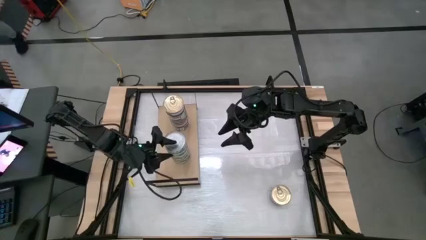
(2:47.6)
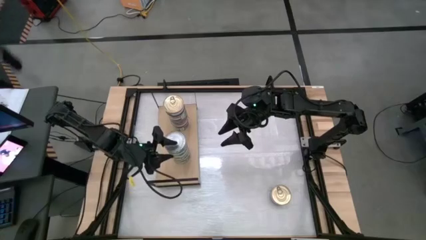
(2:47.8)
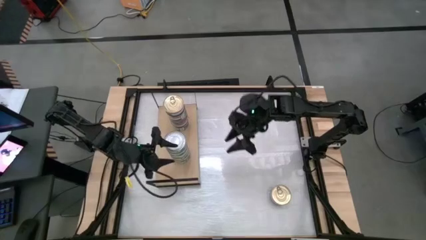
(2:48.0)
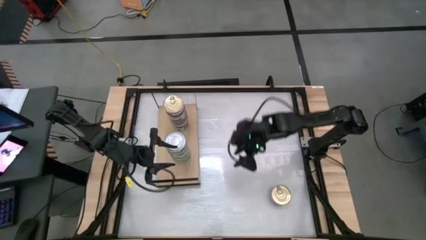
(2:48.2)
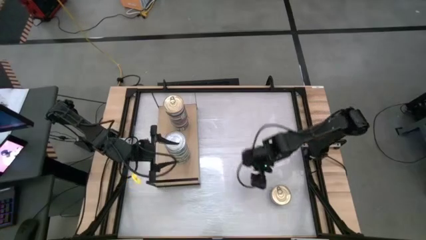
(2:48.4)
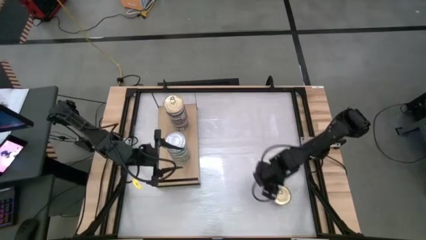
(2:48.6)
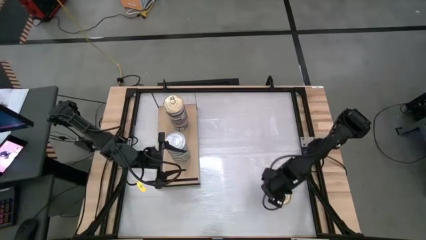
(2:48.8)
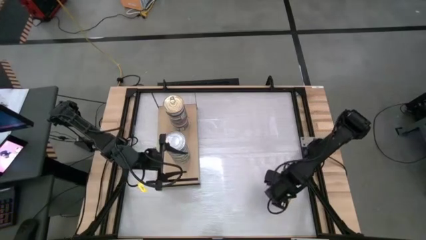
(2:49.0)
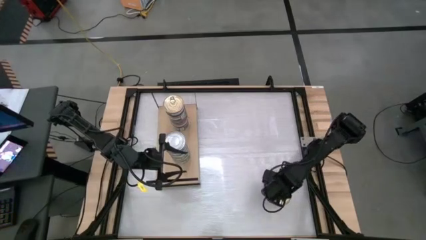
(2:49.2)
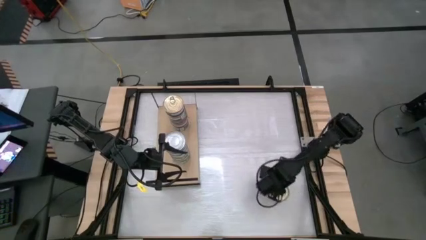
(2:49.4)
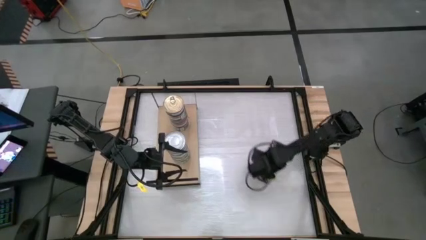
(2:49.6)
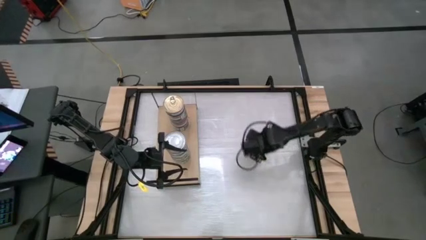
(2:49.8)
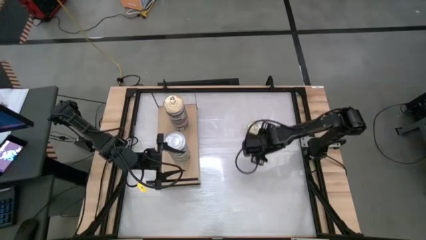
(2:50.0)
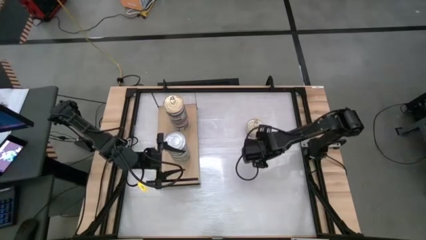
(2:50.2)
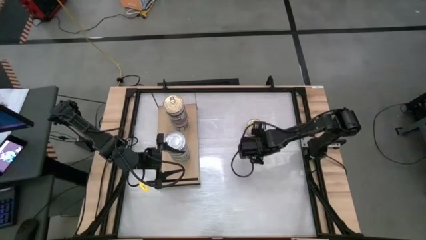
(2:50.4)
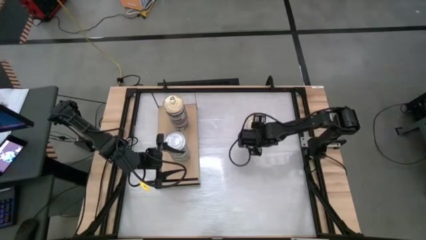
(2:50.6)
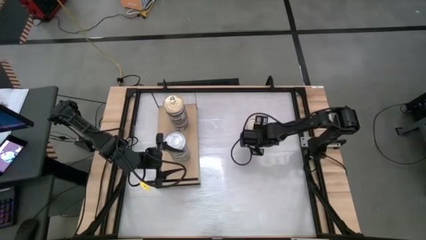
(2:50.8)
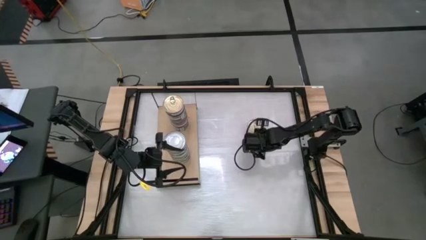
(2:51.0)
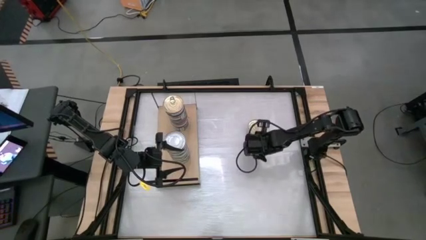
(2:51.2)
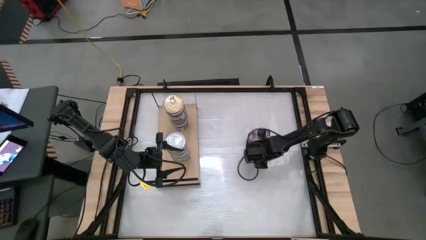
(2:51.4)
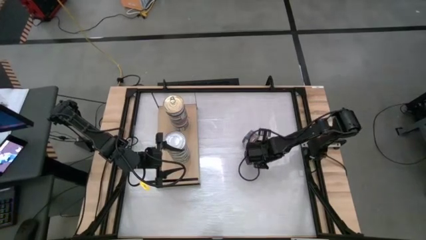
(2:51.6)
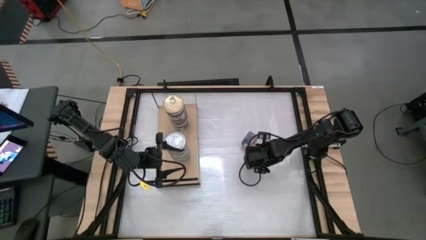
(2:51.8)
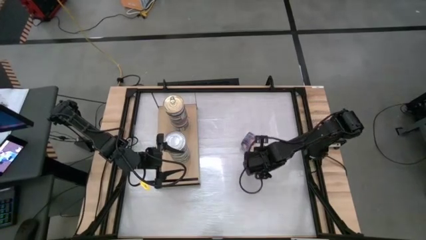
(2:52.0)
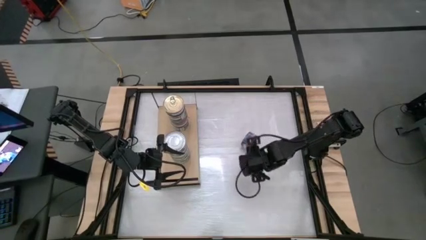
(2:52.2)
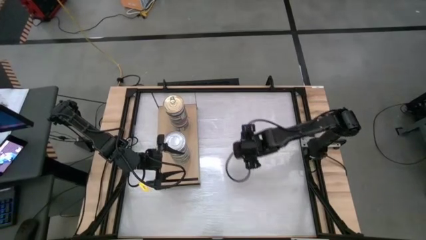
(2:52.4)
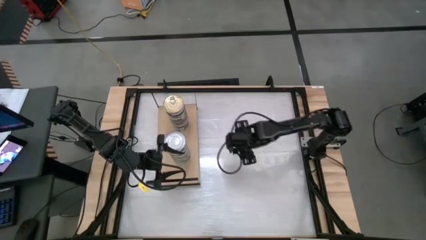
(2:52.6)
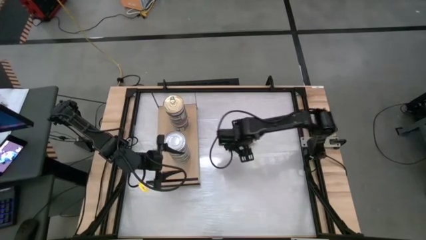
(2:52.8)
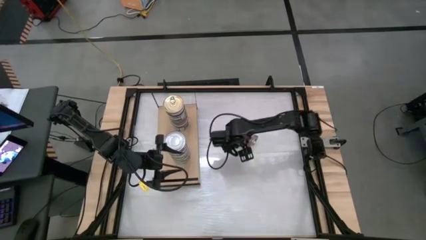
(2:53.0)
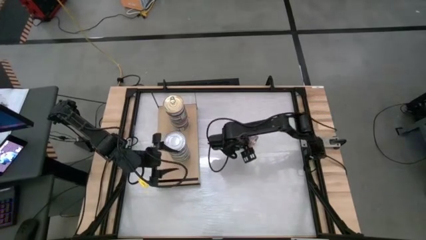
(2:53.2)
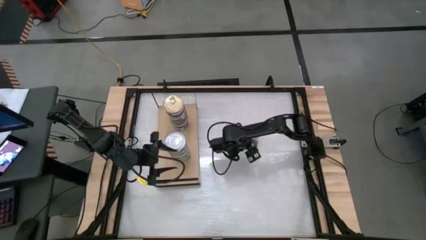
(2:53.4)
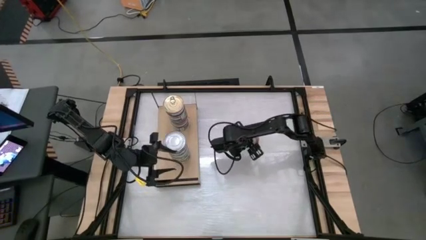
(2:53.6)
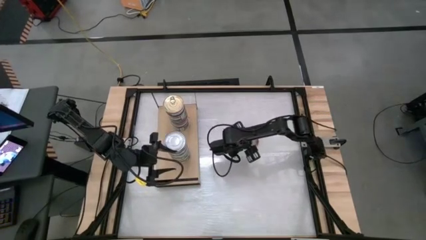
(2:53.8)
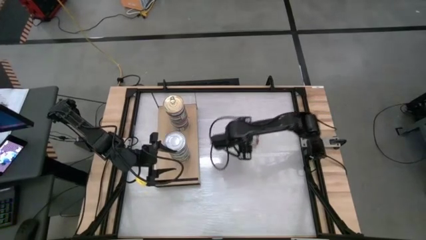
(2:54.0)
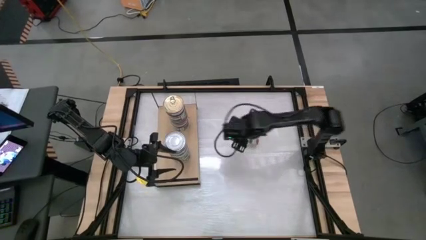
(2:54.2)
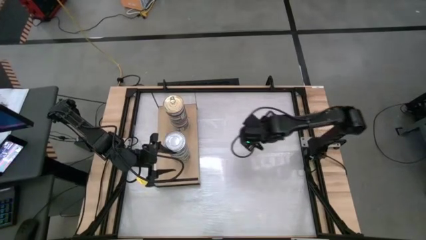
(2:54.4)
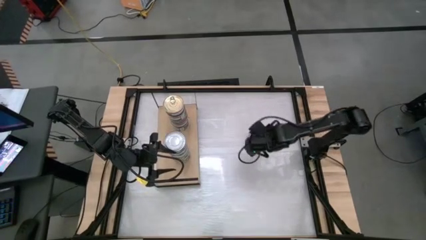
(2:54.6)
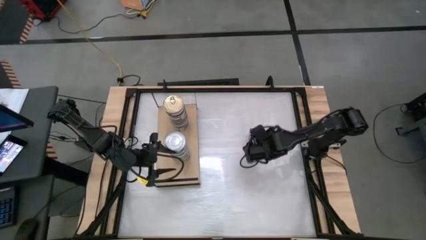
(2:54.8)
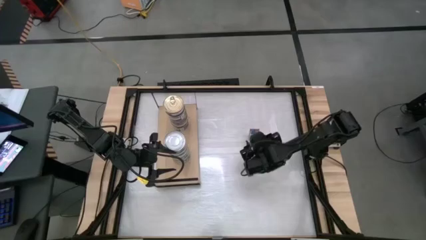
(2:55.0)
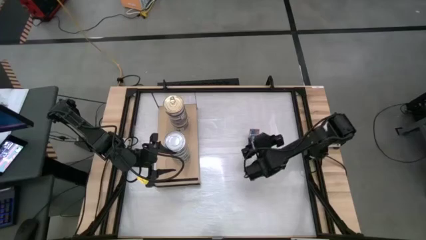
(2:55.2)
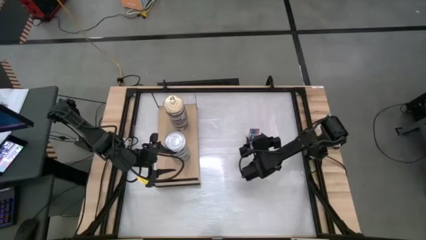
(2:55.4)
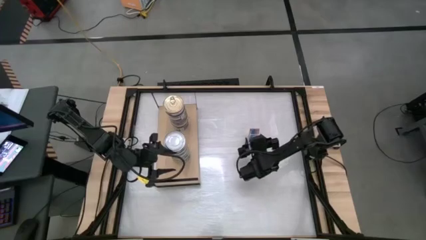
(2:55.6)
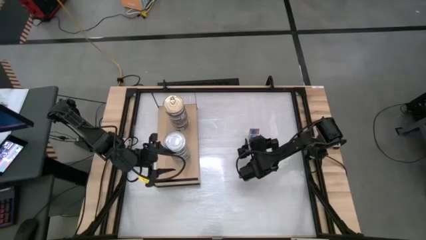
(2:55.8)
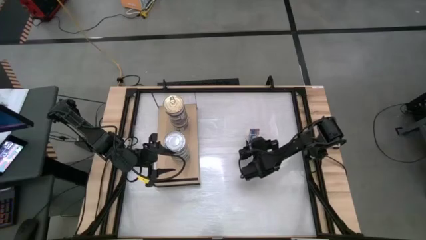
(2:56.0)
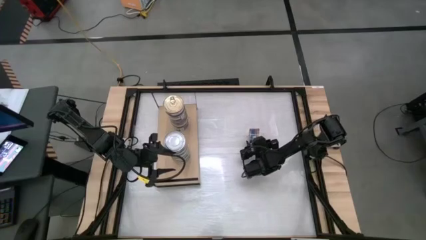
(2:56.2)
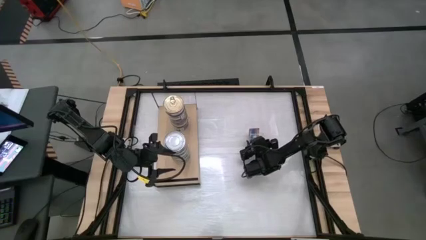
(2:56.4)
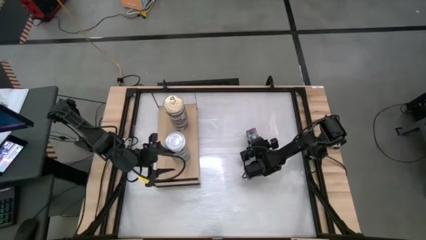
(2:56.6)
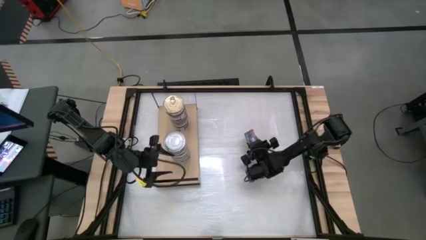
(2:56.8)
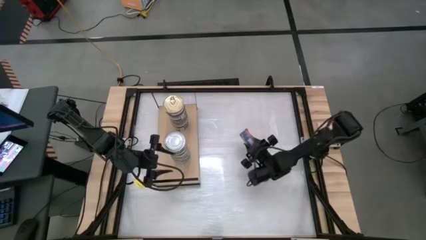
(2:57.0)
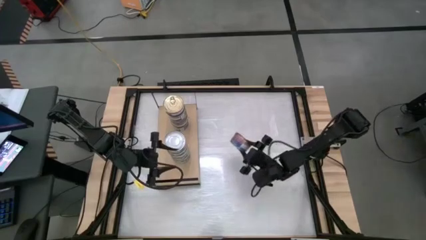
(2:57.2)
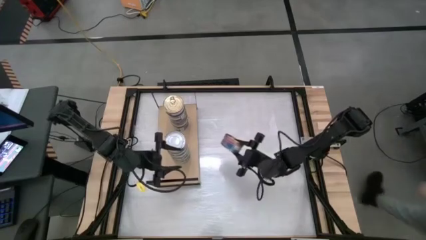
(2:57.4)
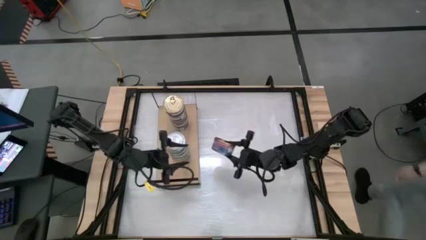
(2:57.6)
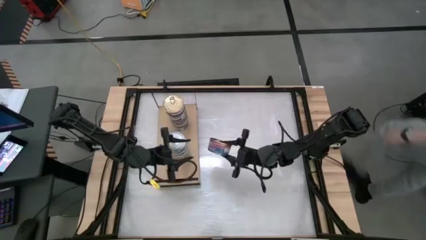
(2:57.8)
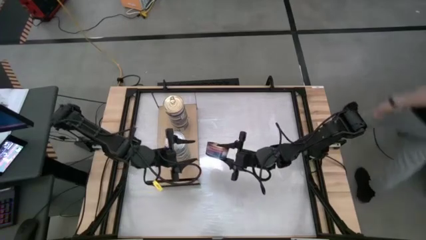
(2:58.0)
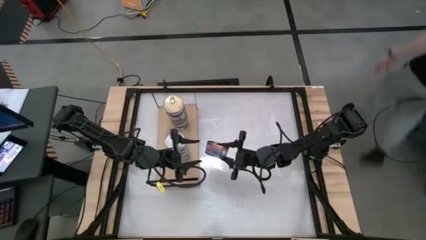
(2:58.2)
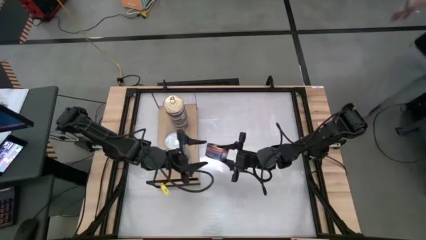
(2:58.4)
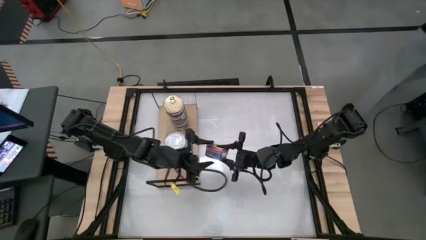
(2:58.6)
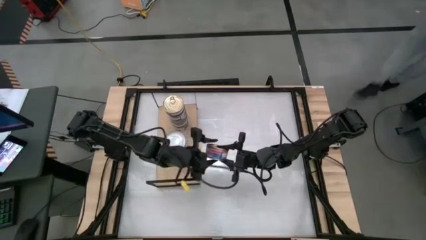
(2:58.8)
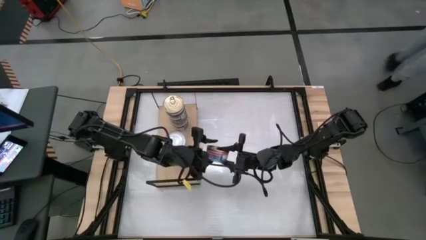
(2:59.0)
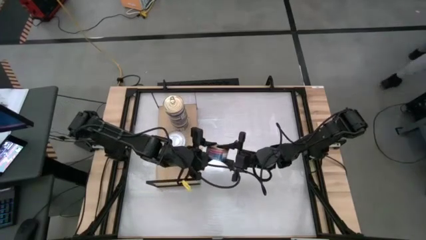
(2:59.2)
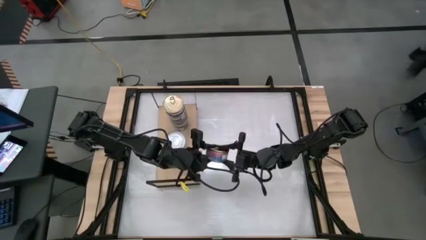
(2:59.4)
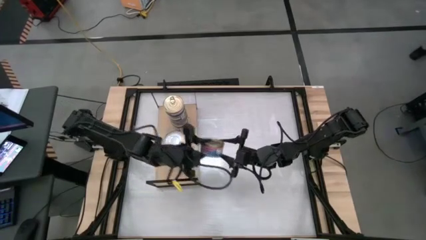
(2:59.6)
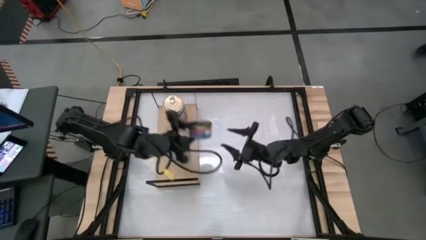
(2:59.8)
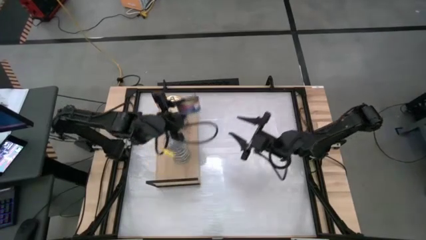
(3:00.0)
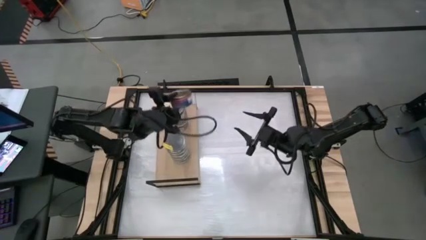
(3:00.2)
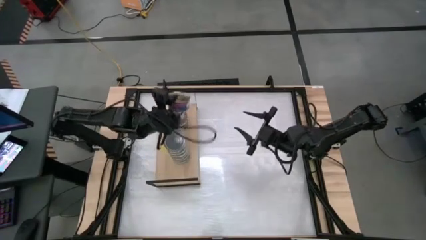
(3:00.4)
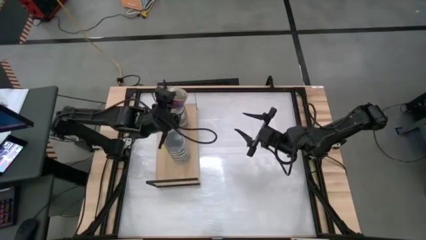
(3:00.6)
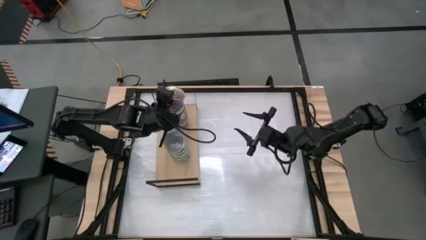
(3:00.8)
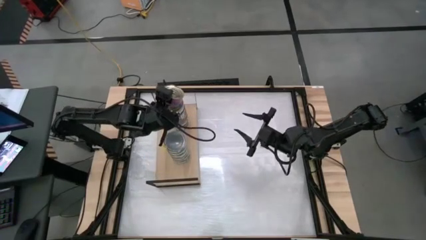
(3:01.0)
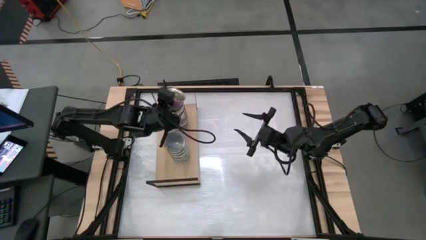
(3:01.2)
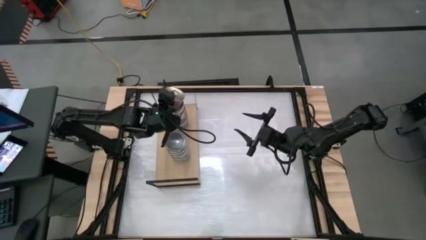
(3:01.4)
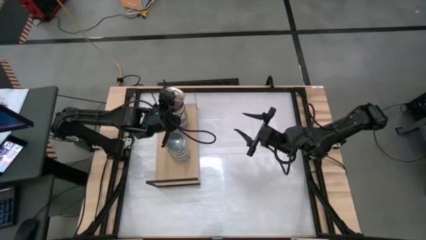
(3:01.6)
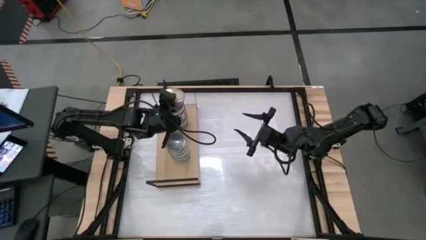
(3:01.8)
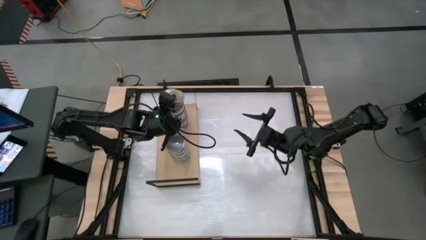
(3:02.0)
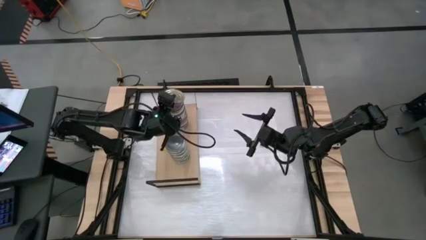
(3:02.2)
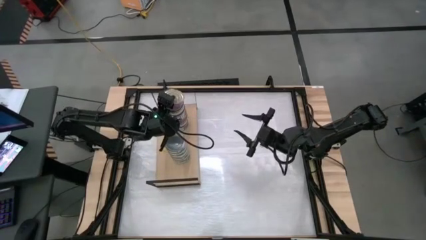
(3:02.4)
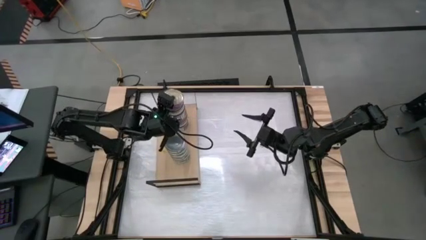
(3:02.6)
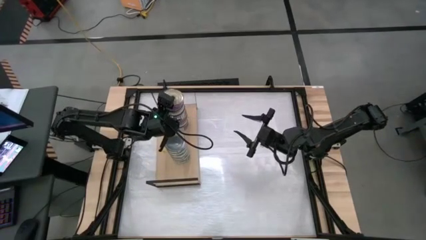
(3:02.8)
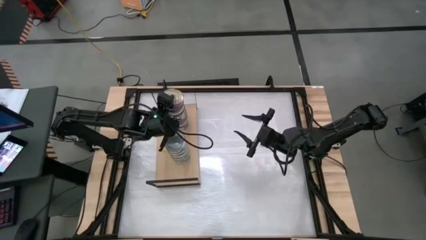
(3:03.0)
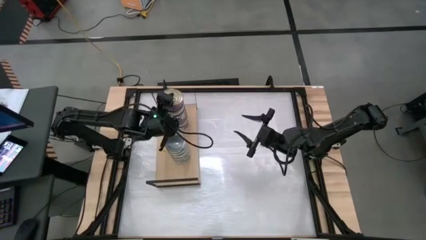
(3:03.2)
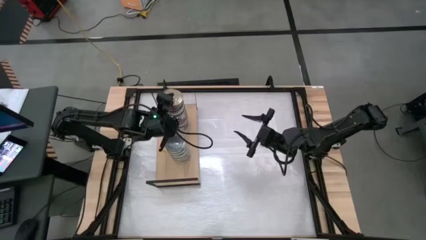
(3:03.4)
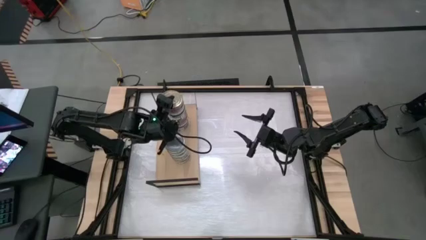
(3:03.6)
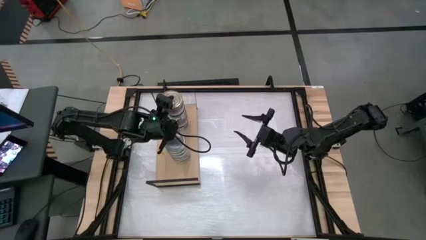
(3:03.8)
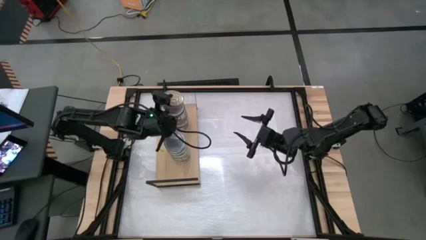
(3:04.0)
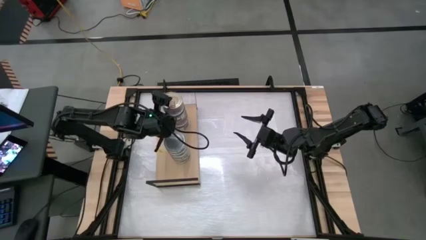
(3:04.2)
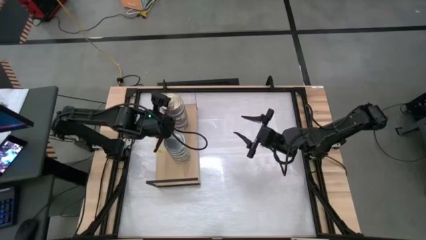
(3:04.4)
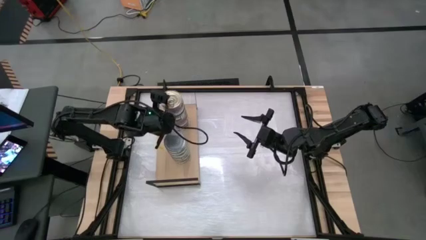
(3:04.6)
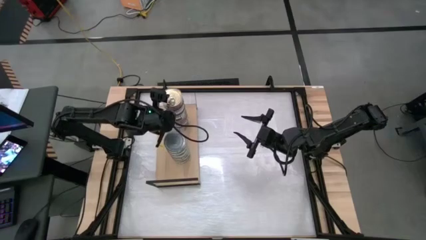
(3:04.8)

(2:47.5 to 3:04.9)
Task: Stack canned seafood by type on shelf
Stack the blue-pink tuna can on top of the other blue-pink tuna can on the shelf
